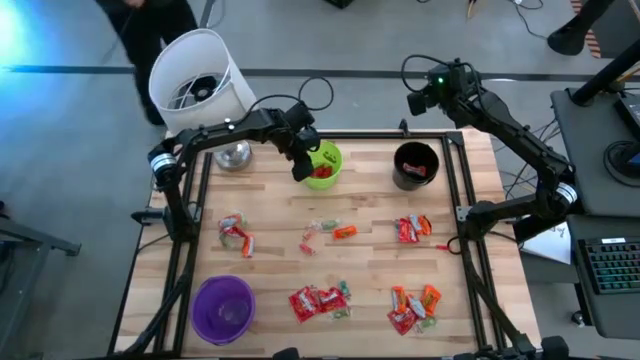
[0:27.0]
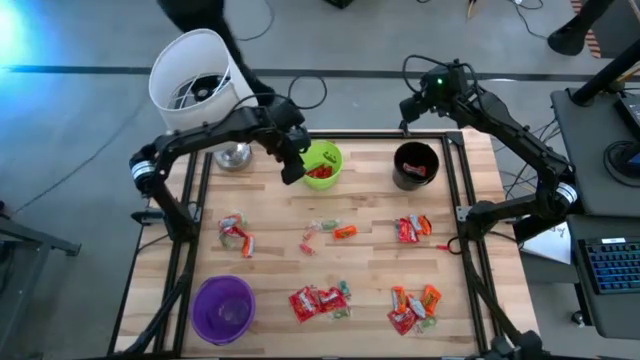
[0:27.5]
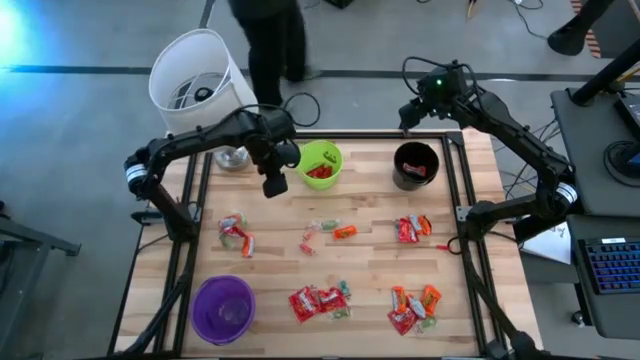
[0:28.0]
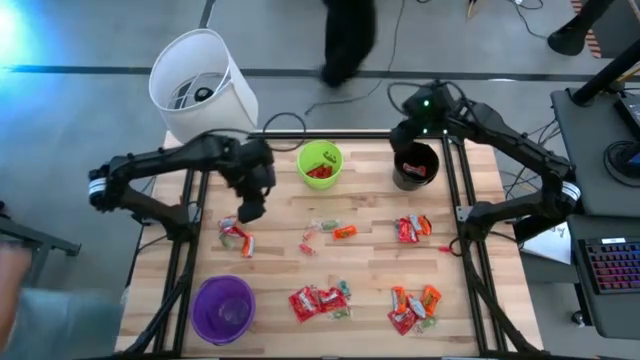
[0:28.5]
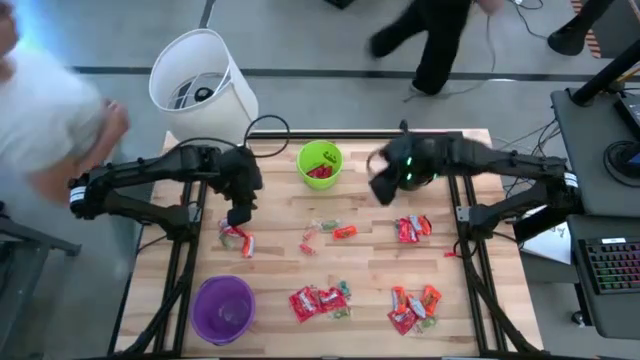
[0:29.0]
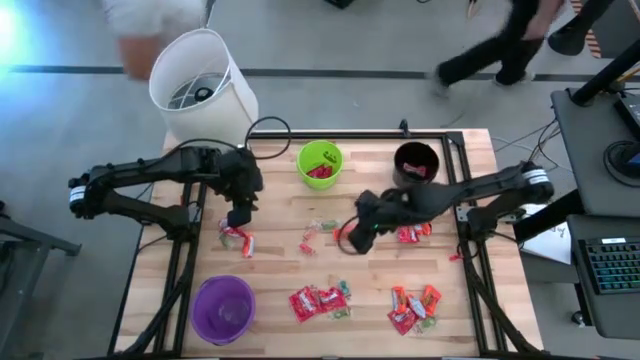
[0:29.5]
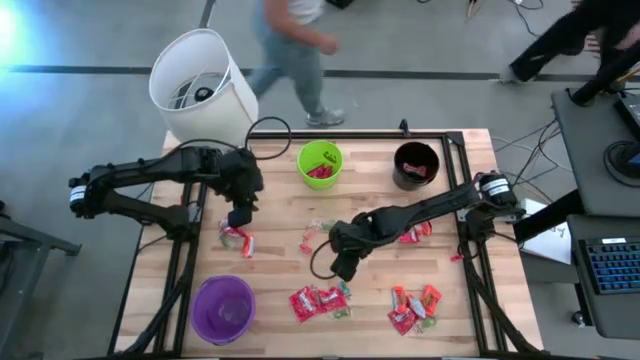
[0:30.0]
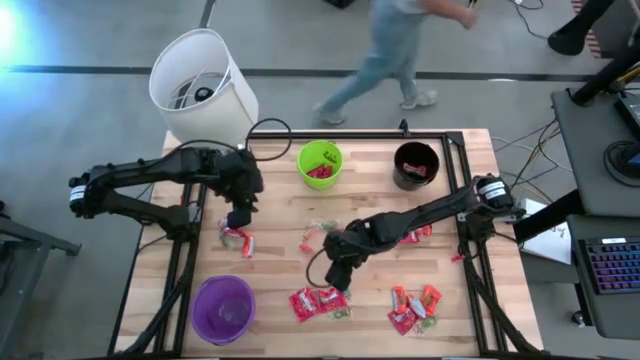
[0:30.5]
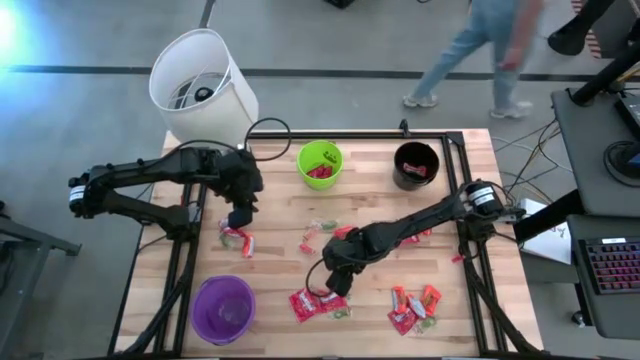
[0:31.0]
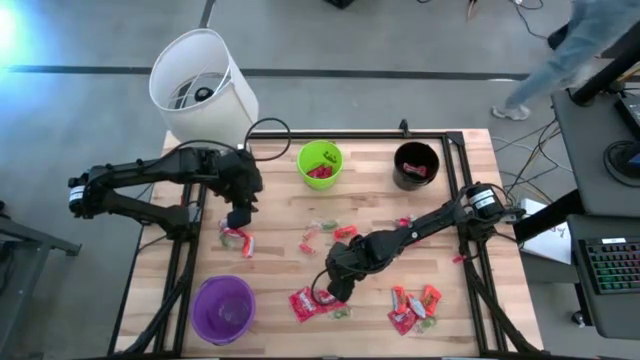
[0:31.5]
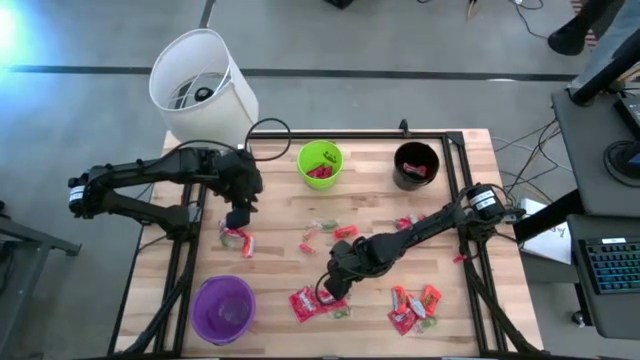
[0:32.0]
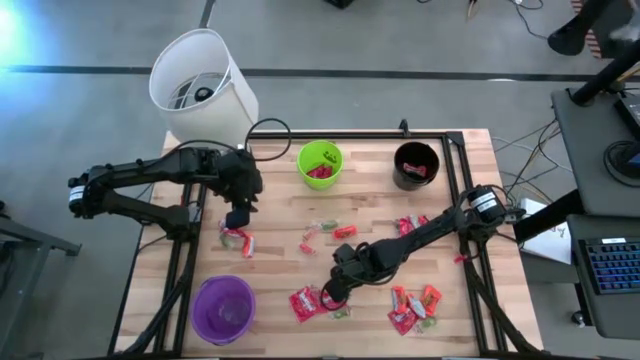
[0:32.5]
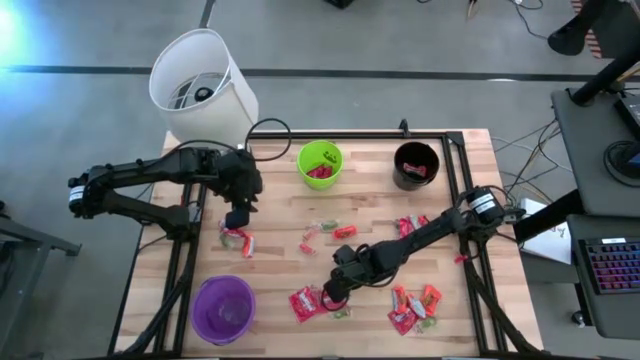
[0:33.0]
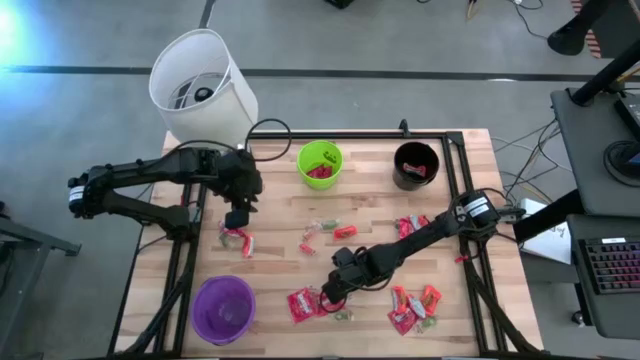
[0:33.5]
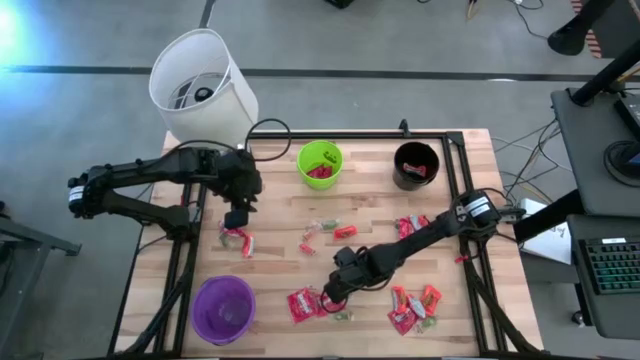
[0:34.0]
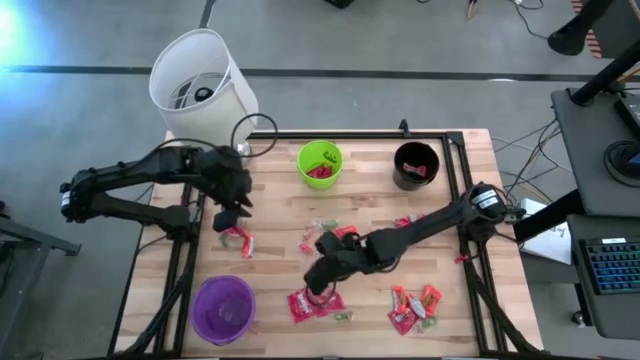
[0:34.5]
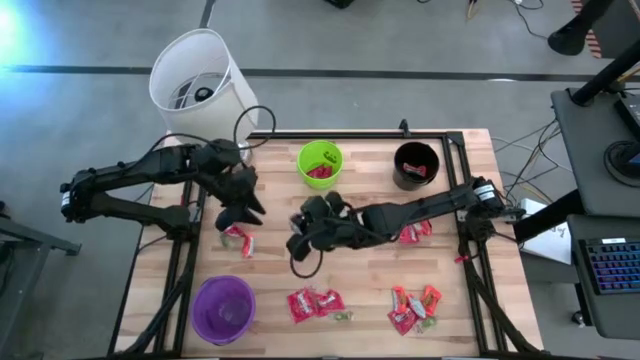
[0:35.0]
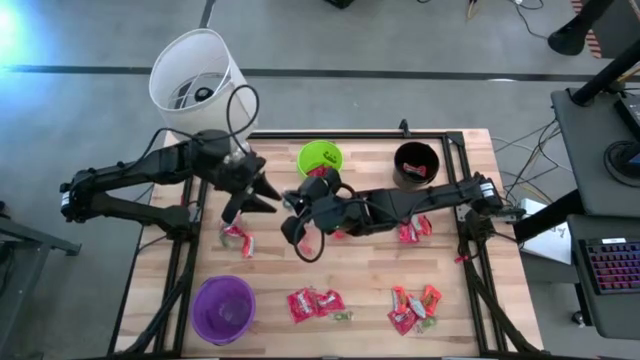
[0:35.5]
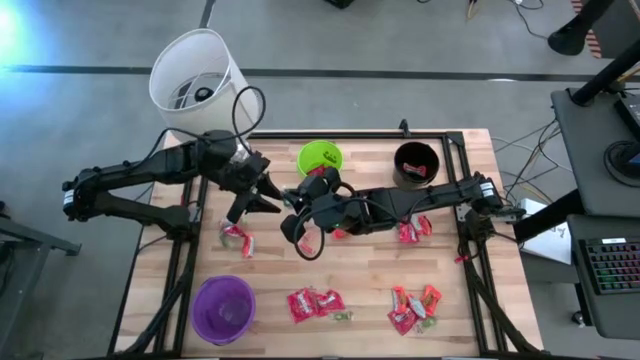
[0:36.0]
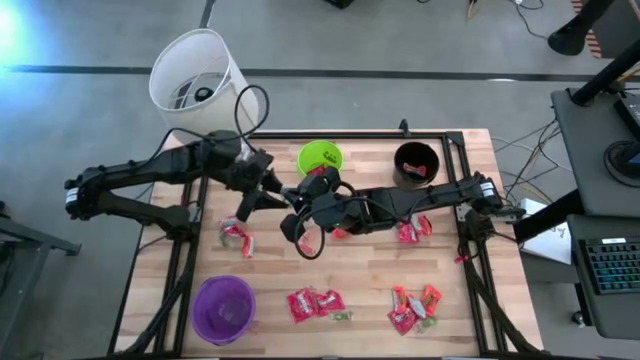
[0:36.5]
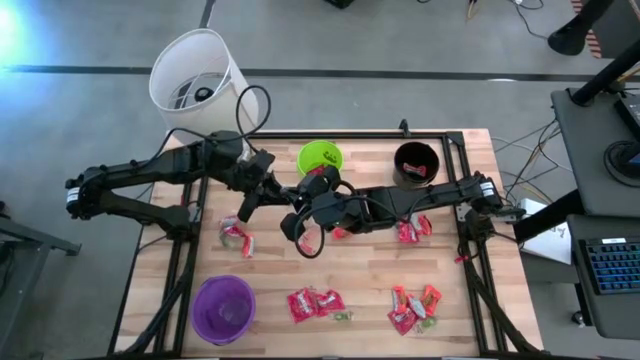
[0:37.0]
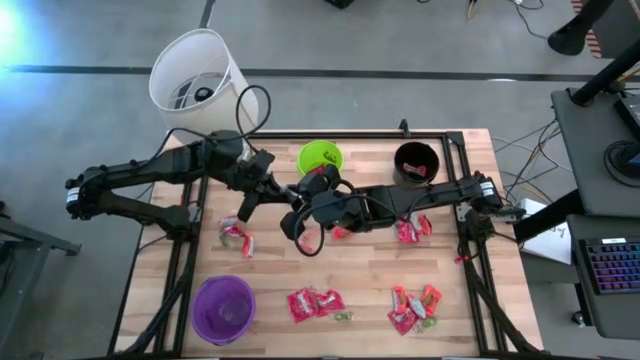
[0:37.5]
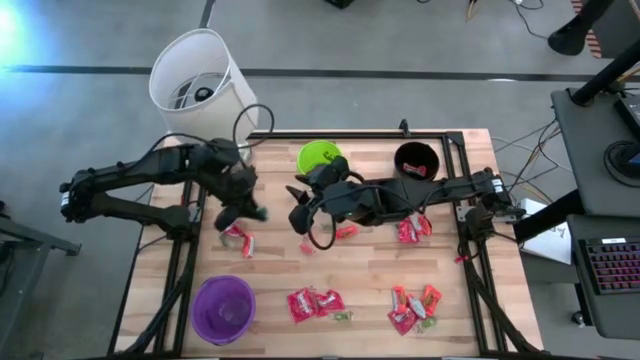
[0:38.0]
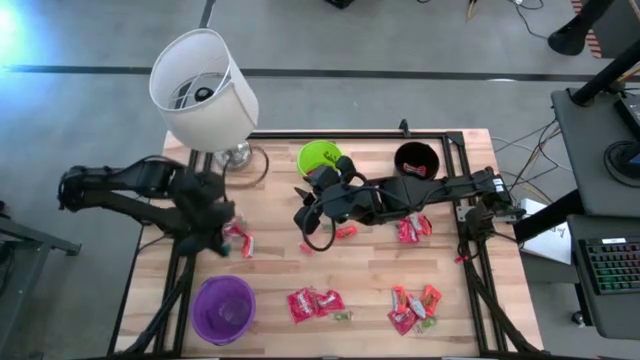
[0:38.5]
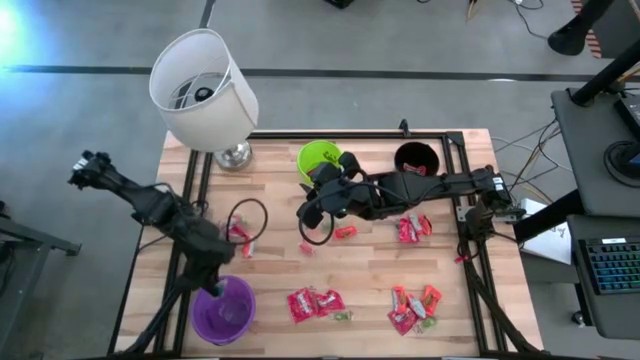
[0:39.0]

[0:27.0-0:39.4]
Task: Sort candy
Put the blue gummy candy into the violet bucket

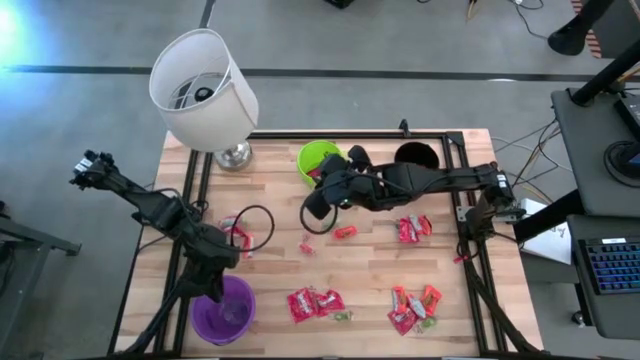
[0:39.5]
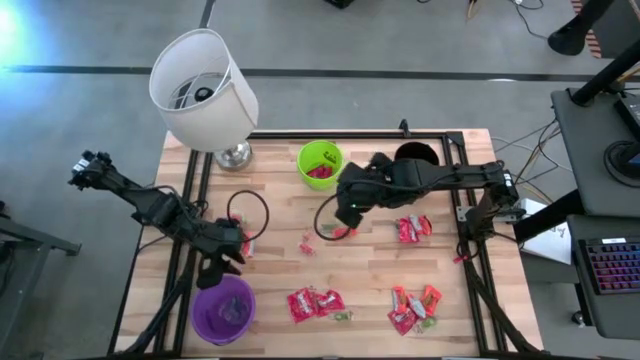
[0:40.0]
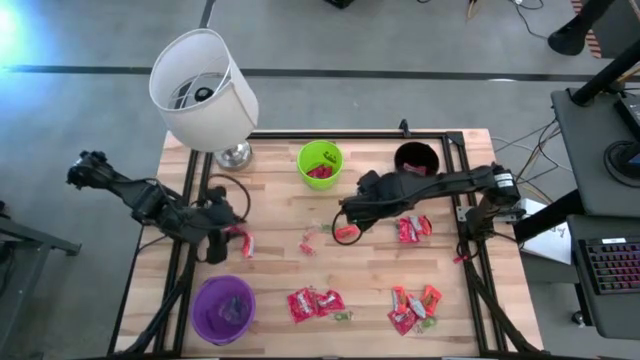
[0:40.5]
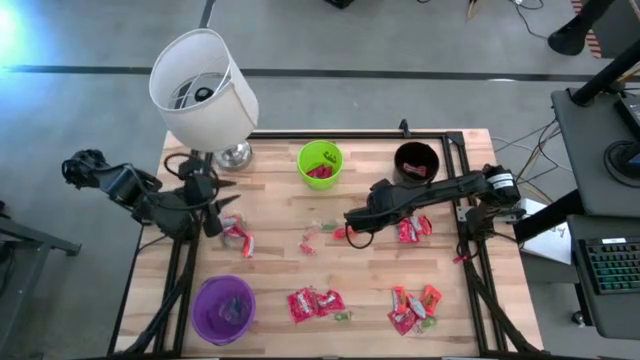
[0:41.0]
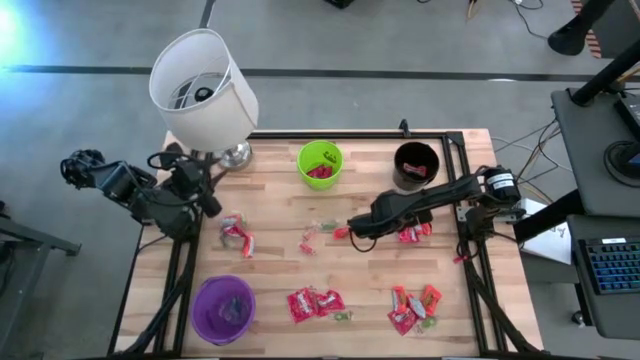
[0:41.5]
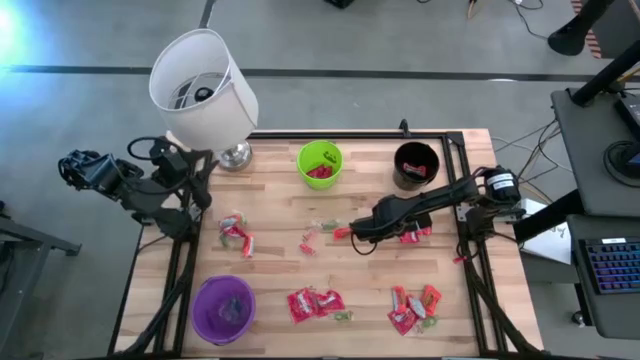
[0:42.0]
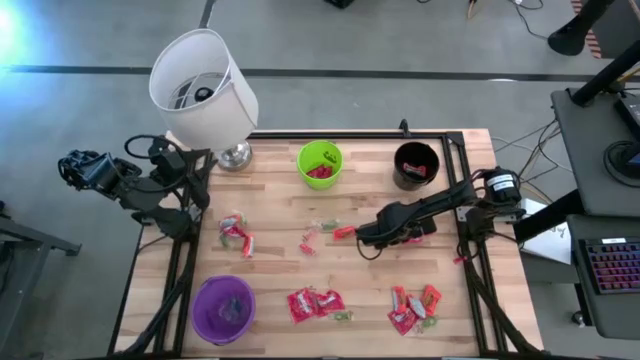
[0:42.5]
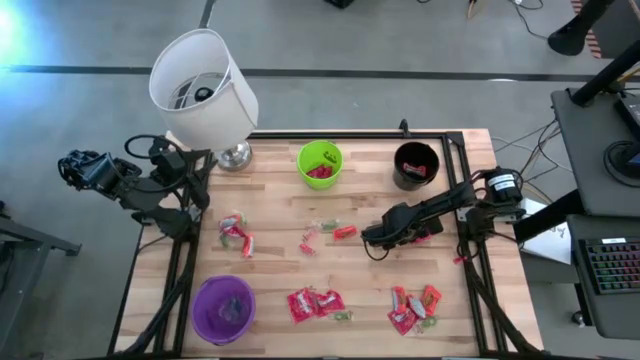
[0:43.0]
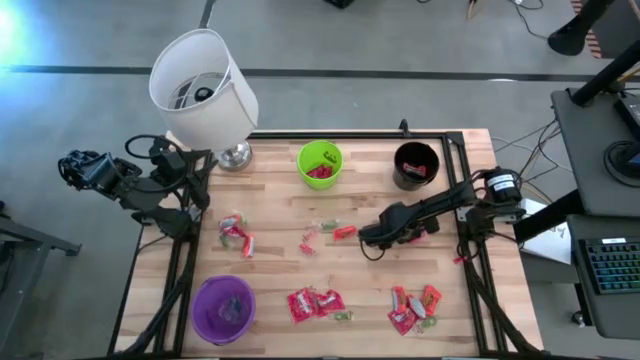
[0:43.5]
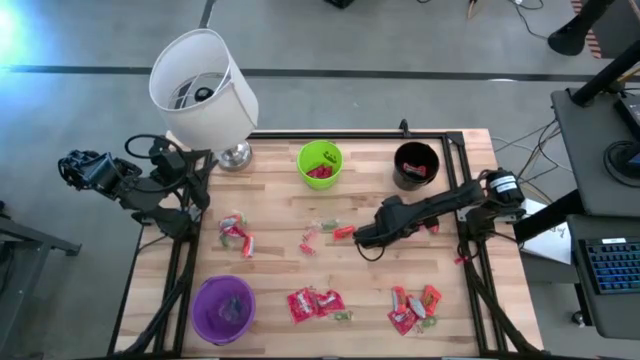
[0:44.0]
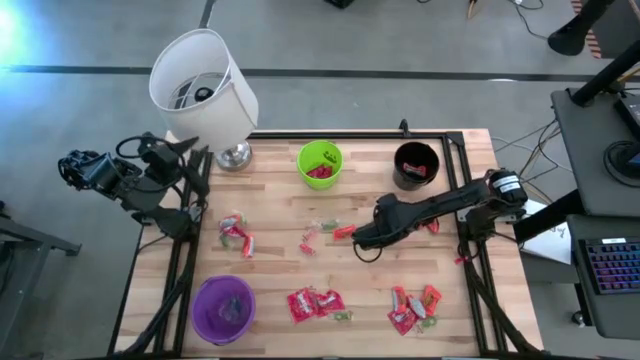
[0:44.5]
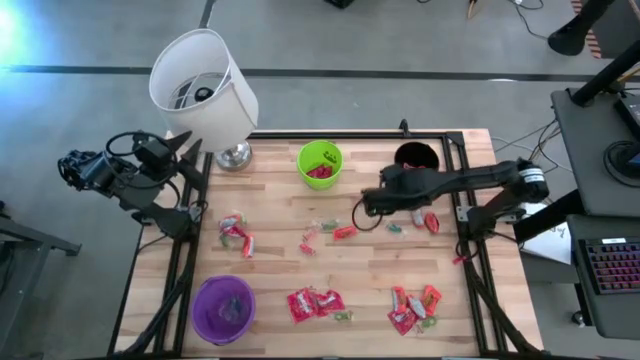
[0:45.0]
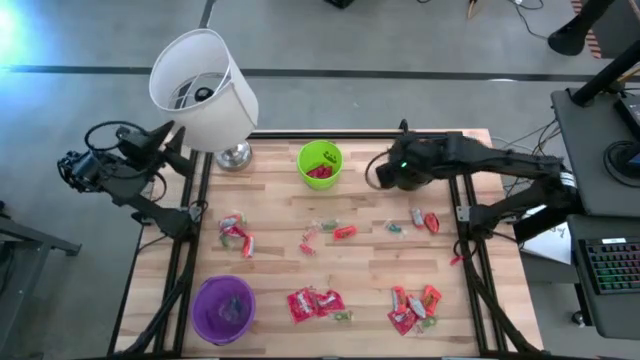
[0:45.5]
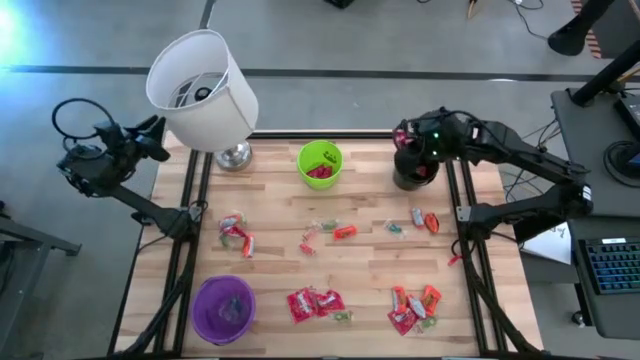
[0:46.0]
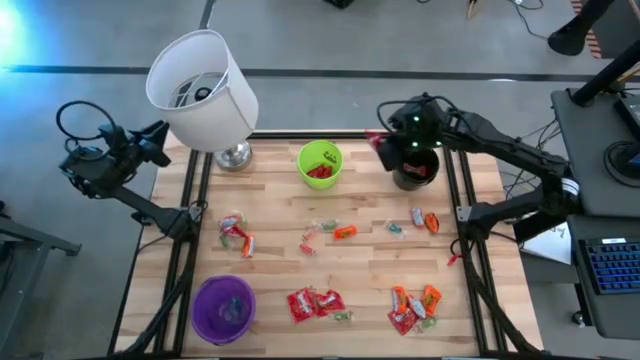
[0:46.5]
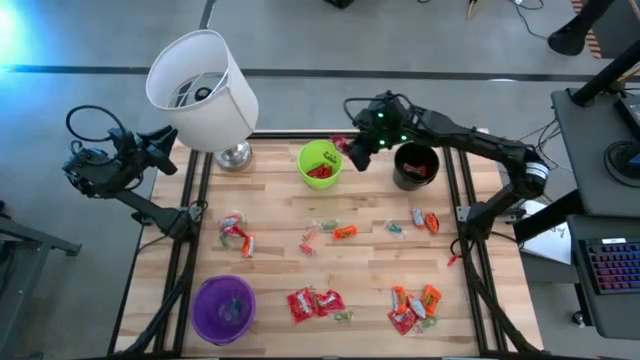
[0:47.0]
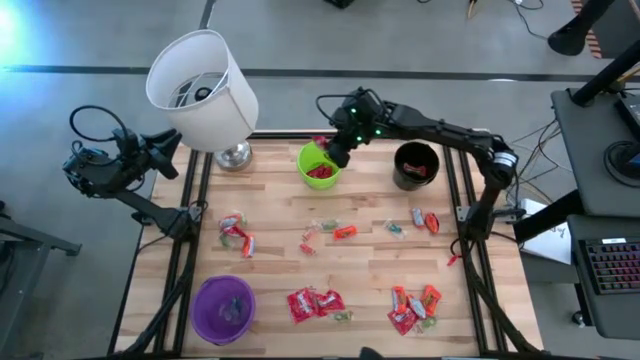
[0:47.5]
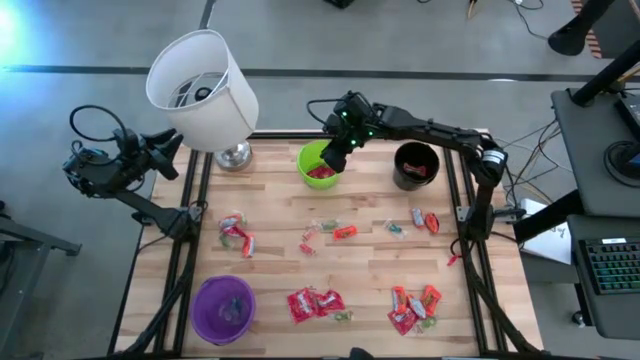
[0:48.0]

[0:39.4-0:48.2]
Put the red candy into the green bucket
